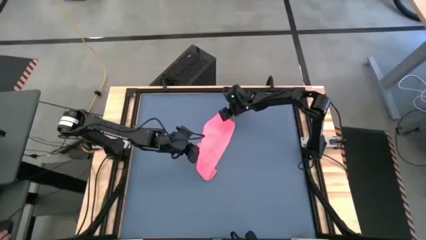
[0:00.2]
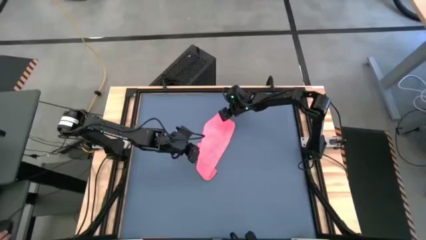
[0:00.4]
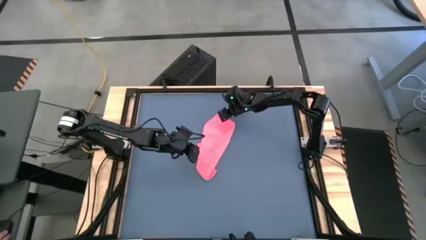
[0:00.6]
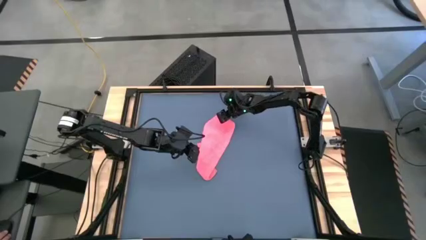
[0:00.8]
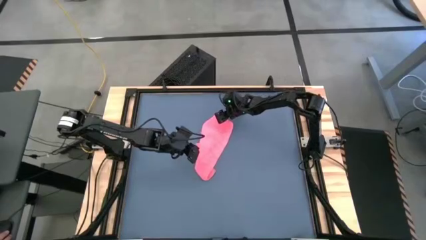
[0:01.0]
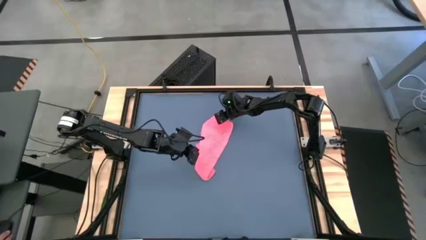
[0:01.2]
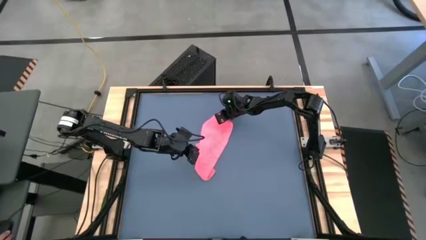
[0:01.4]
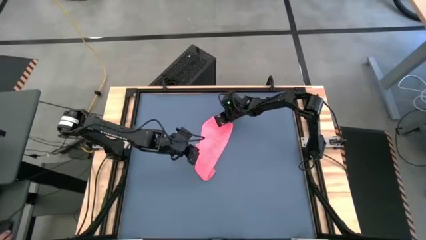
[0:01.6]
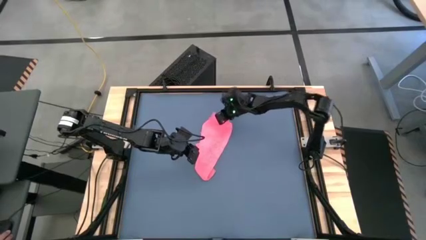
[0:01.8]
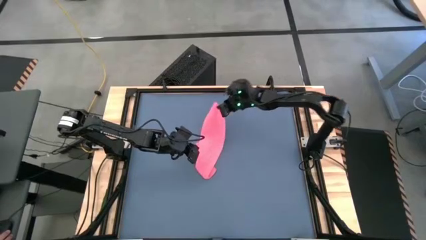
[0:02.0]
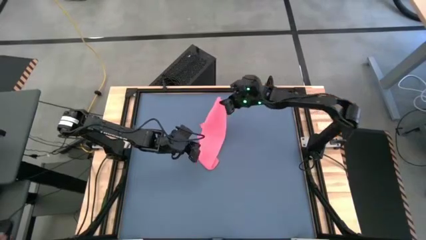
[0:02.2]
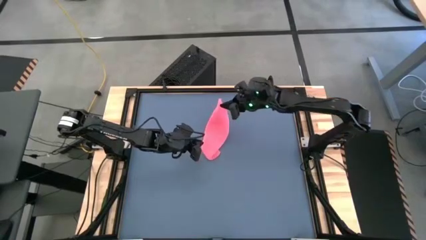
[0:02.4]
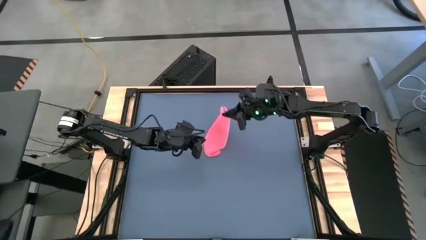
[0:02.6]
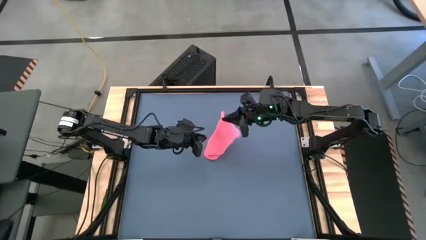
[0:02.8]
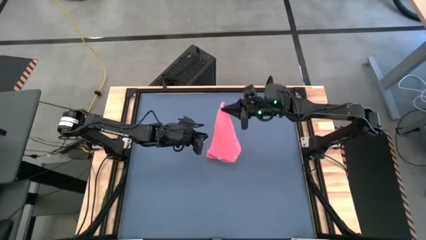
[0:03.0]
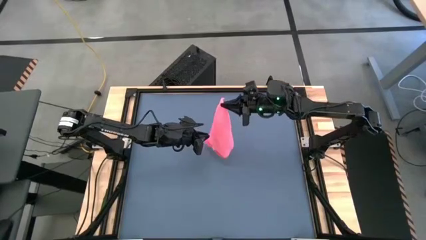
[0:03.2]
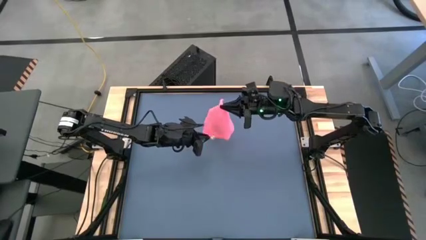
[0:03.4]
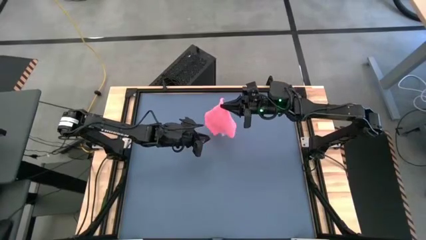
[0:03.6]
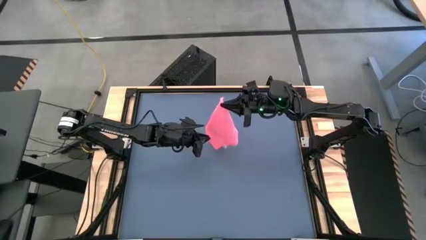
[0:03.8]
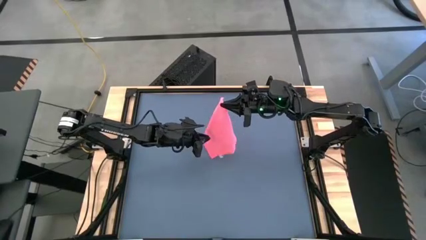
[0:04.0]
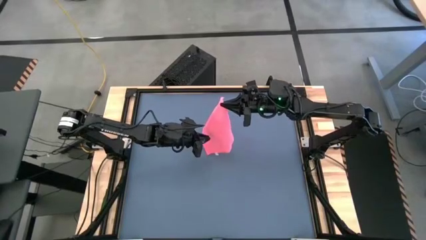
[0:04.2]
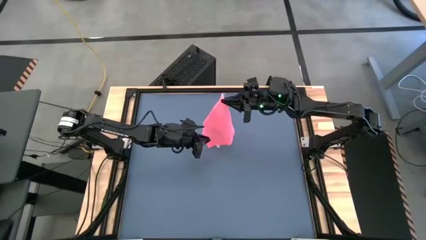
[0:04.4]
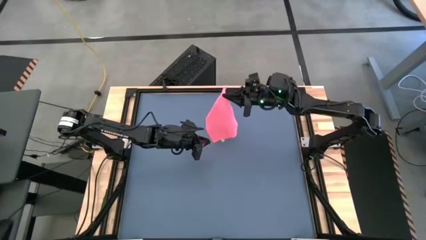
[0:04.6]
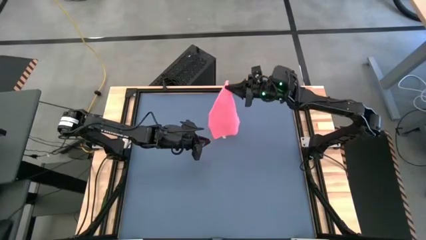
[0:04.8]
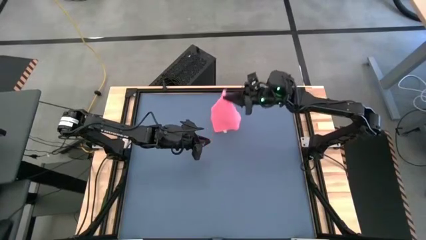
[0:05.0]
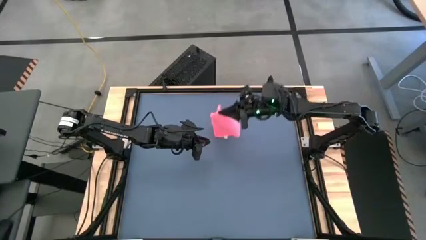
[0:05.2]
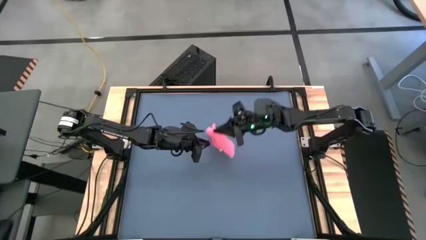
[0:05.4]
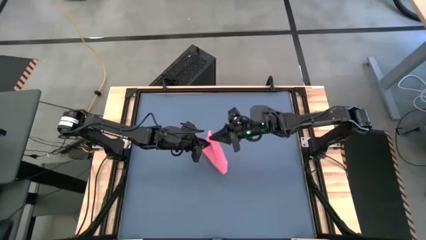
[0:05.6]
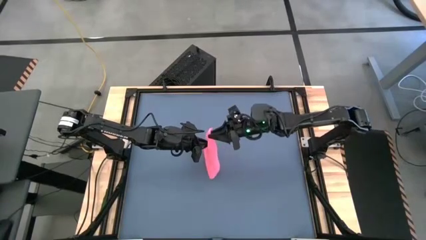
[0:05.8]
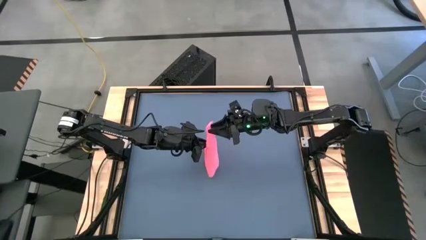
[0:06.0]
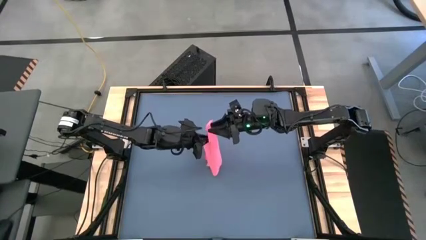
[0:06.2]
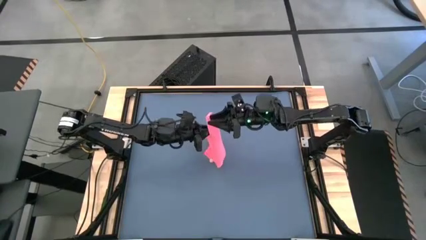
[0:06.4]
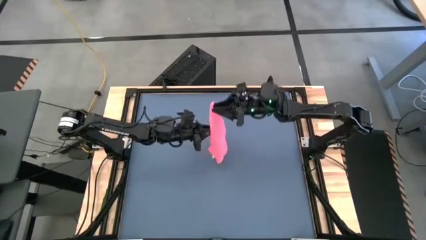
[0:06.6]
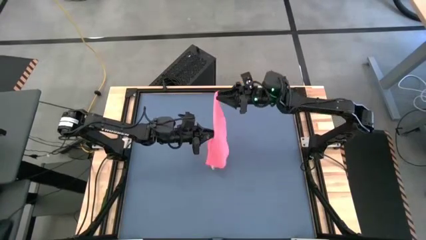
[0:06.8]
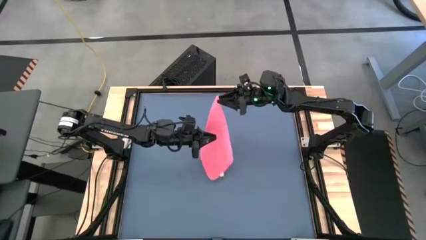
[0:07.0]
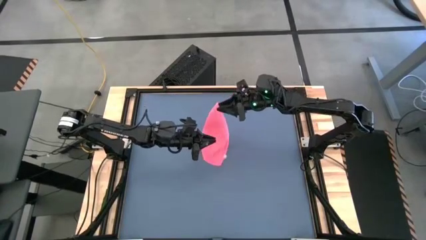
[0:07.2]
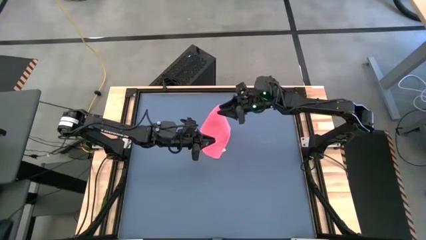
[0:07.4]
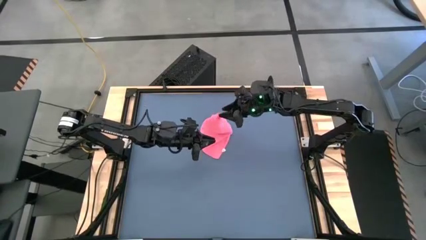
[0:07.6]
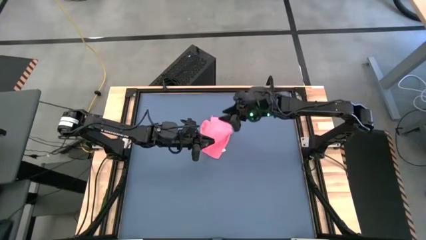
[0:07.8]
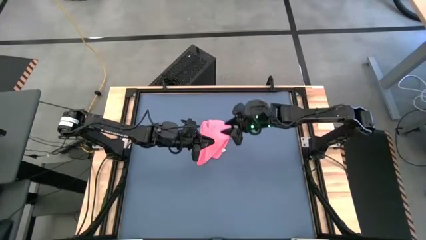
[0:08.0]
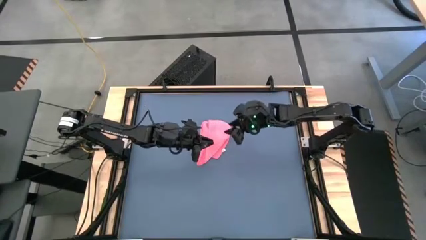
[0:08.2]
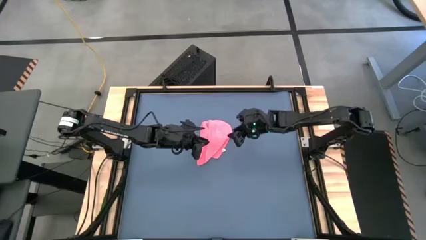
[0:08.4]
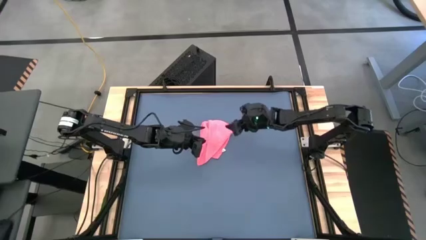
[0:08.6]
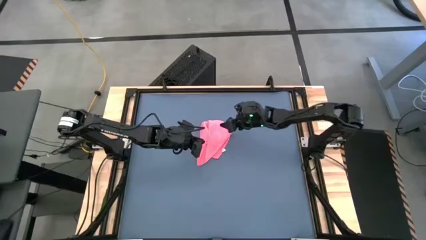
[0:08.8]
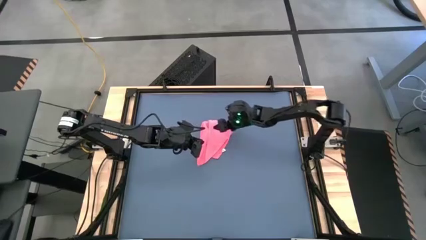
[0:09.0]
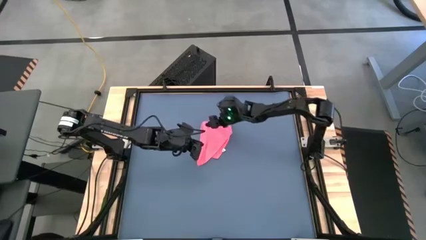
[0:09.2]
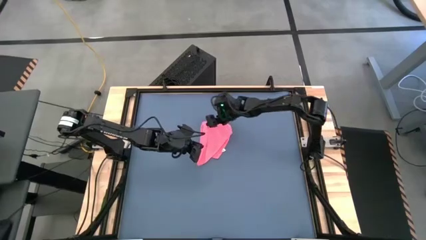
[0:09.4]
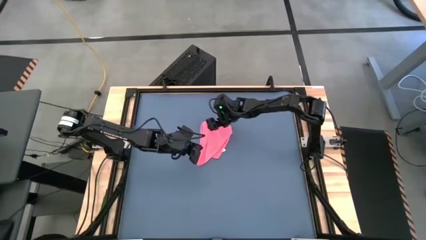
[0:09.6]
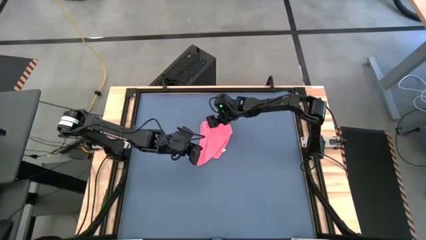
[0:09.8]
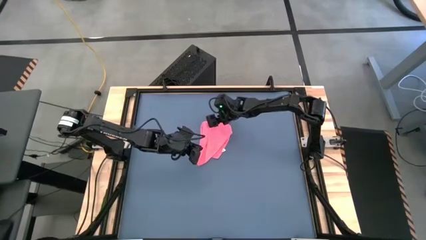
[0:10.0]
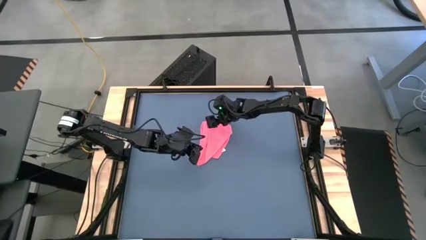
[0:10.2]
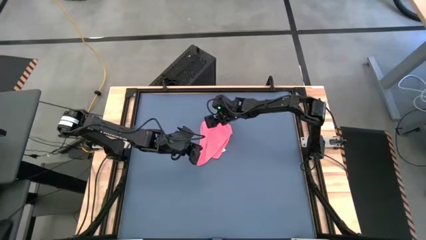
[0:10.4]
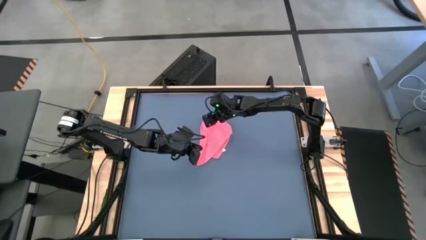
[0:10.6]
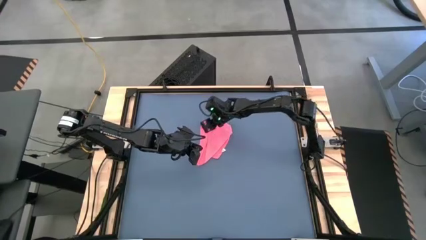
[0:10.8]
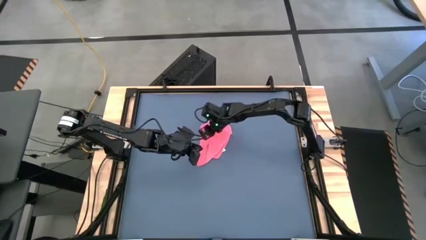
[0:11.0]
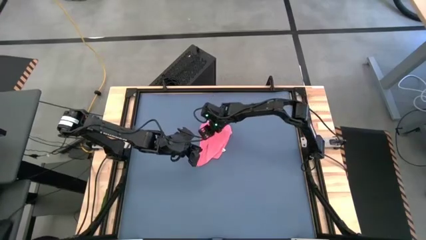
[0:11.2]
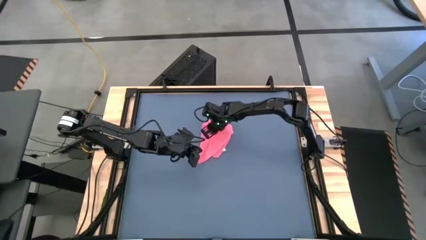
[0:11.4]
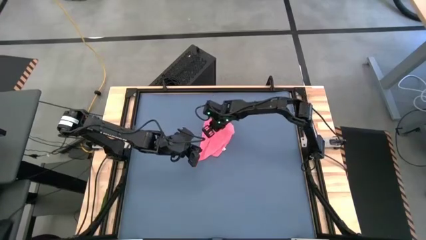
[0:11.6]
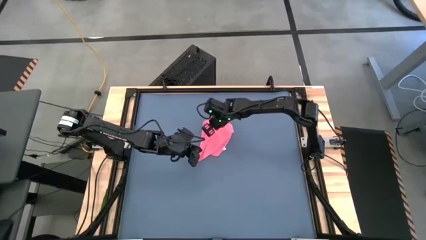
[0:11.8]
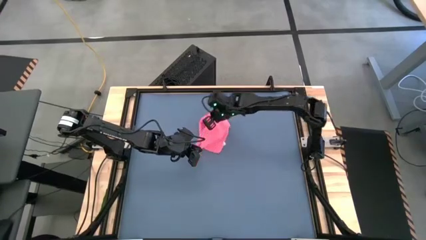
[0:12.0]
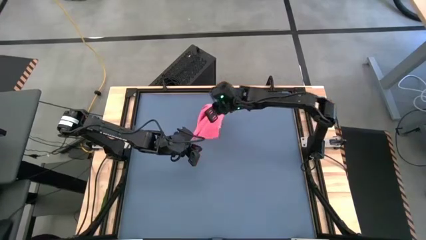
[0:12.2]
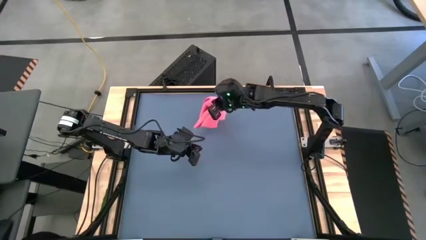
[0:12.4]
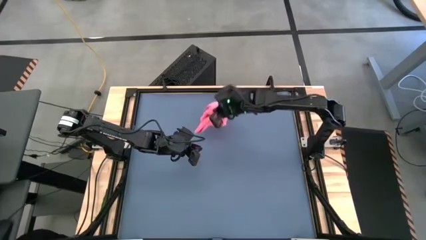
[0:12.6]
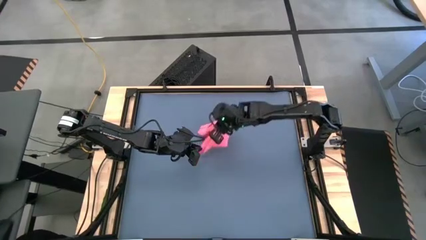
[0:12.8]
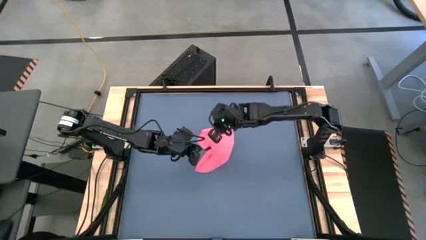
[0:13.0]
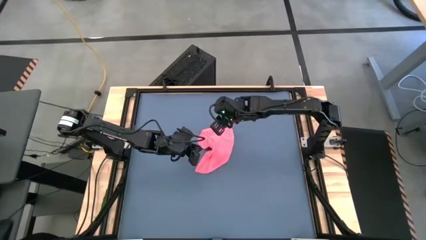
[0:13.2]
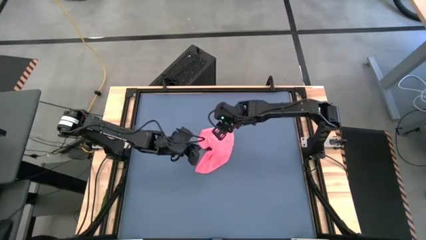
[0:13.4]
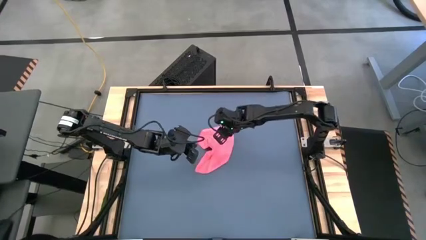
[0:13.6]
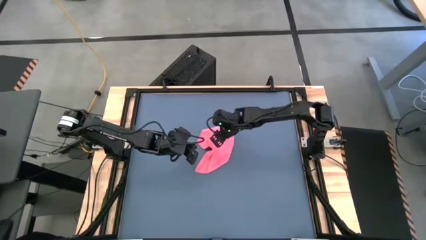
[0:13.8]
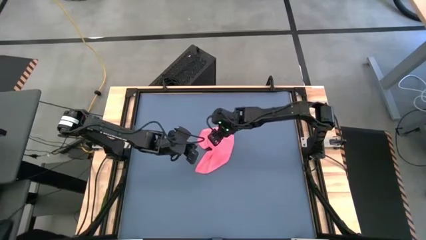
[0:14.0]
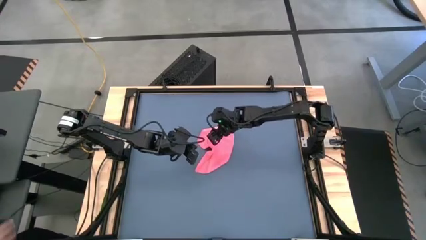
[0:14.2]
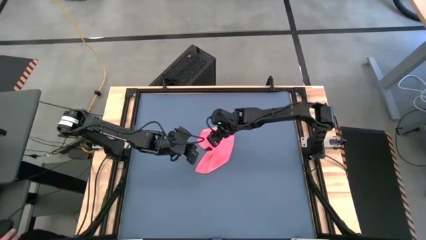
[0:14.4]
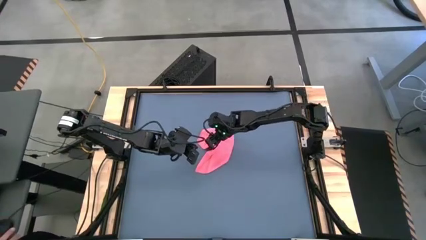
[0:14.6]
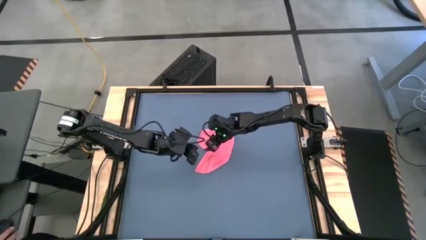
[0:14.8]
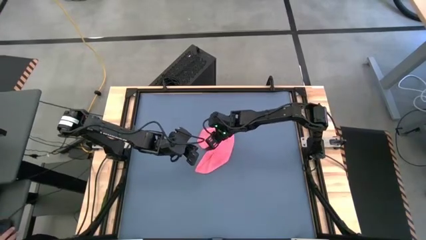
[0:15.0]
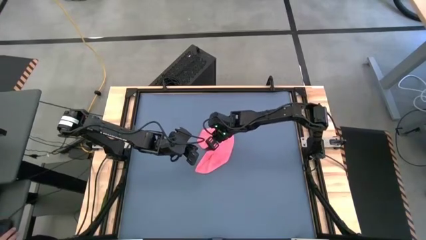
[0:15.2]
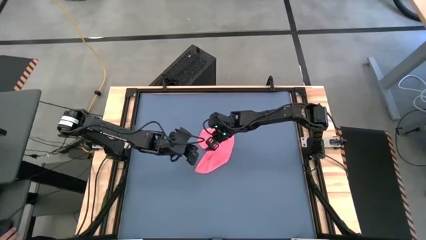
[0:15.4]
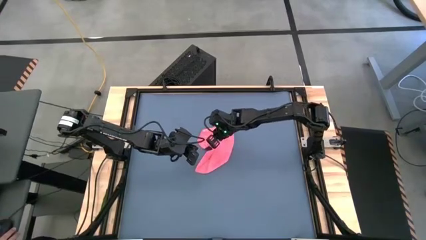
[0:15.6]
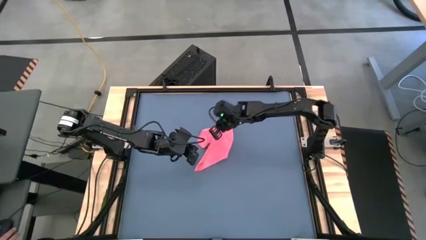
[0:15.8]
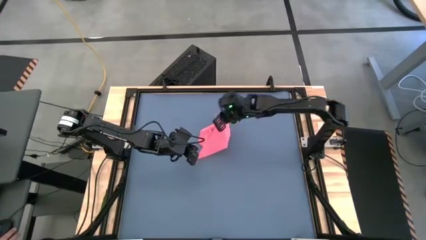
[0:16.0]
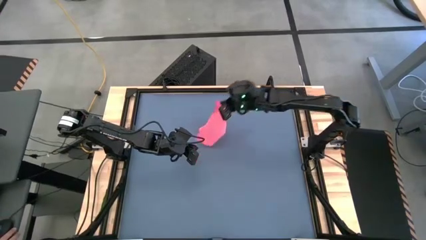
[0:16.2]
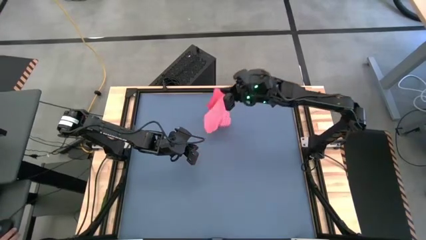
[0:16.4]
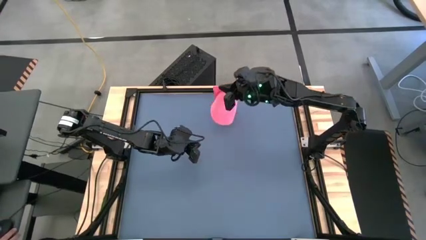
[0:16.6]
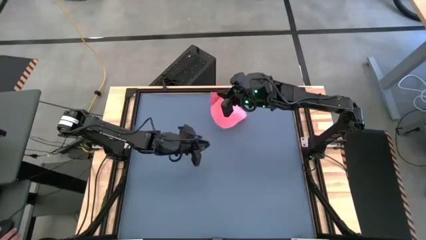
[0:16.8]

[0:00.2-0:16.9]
Task: Roll towel
Fold the pink towel
